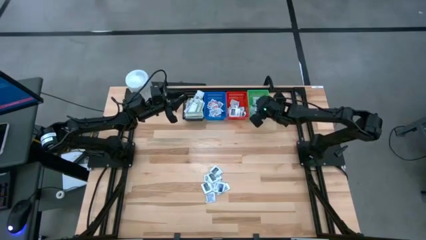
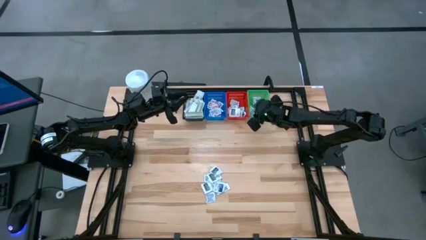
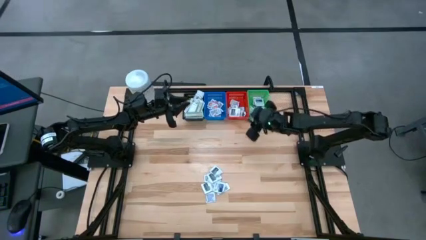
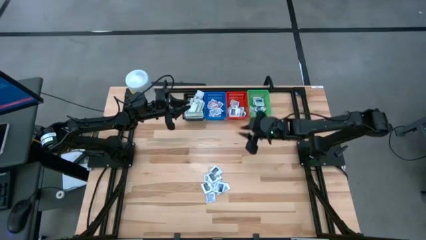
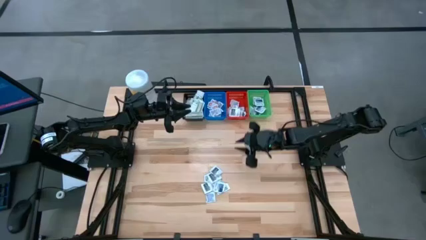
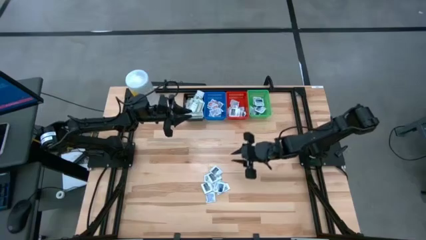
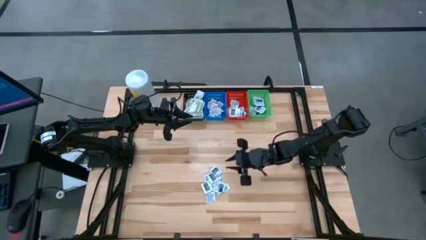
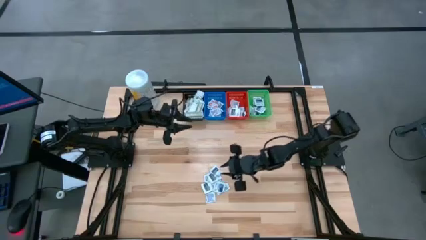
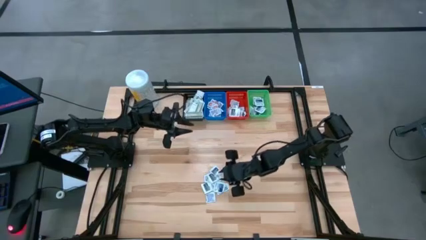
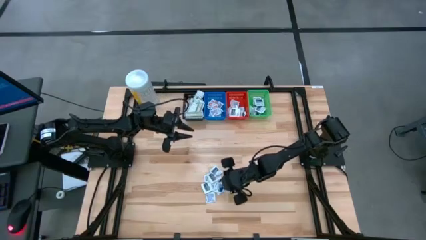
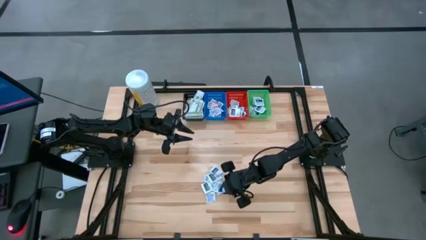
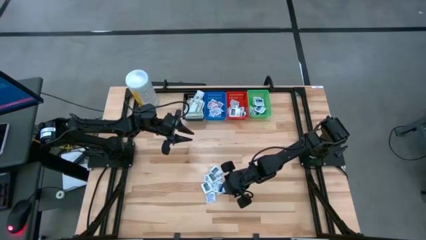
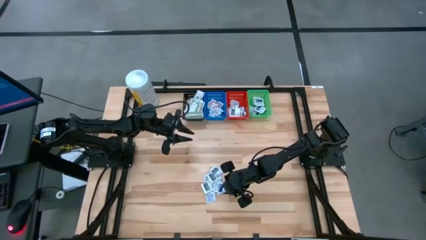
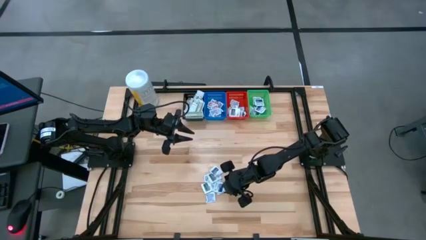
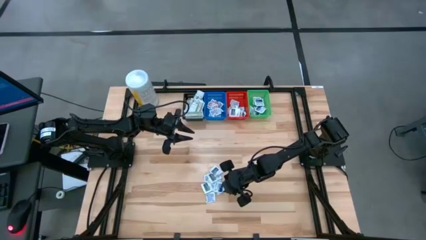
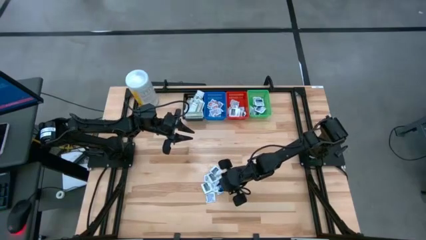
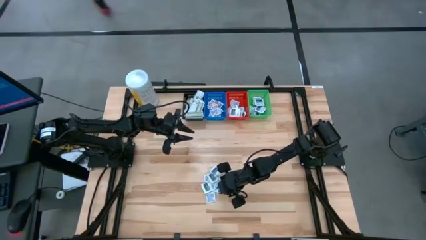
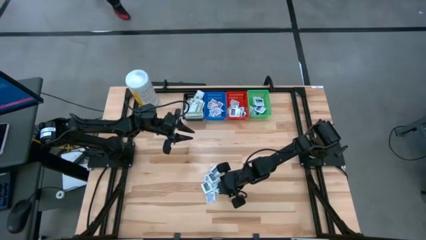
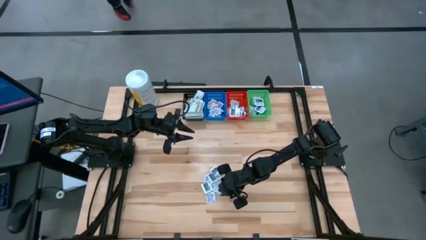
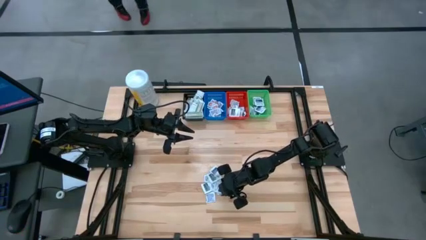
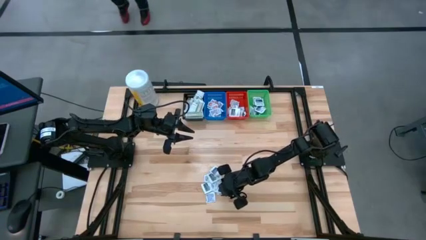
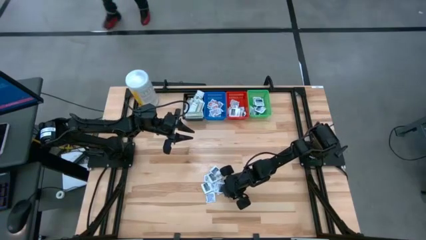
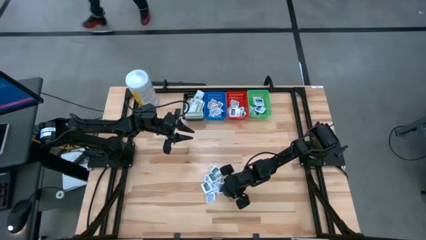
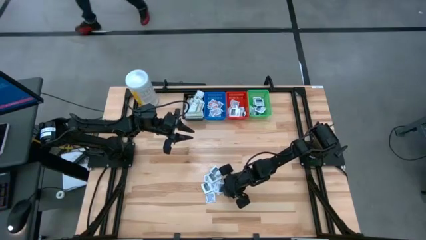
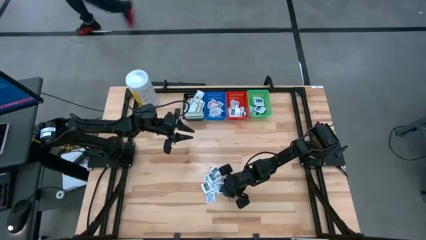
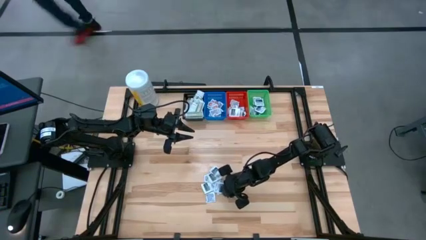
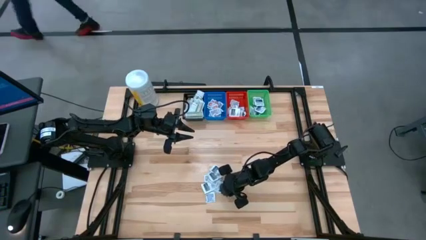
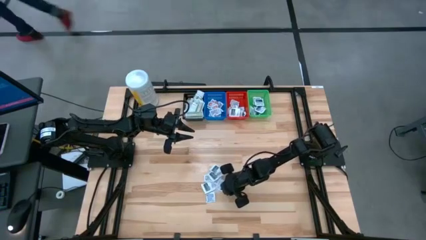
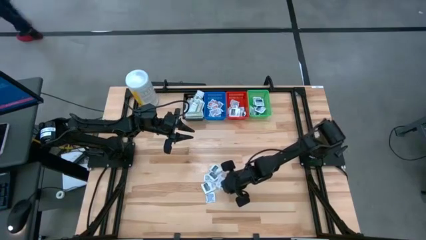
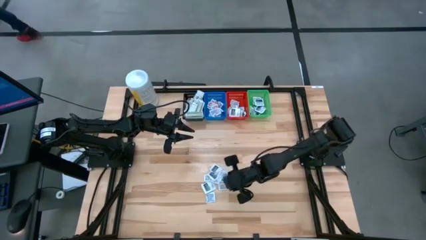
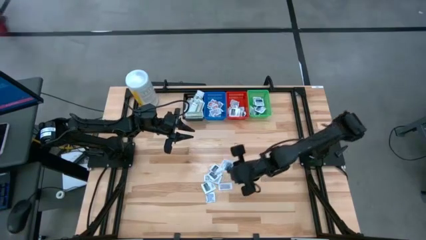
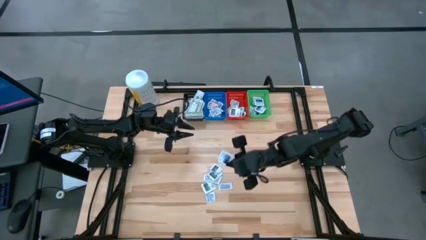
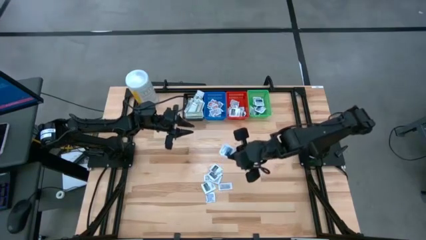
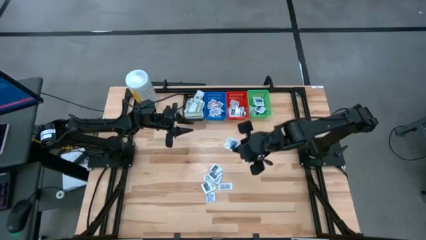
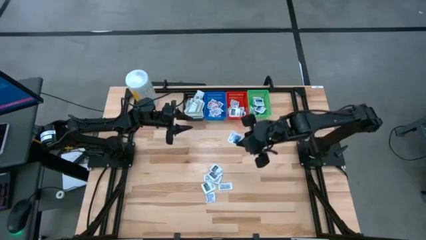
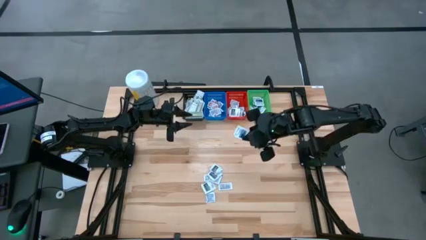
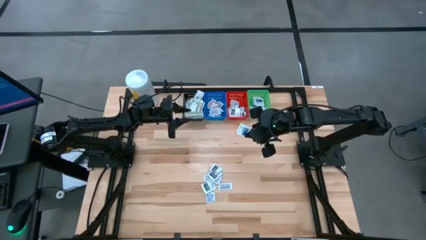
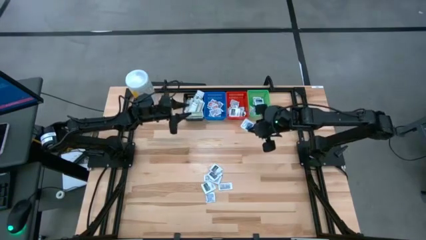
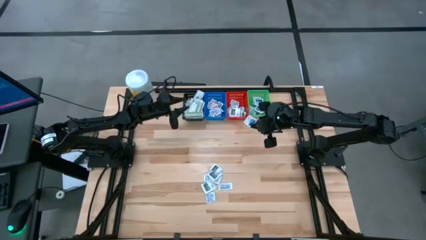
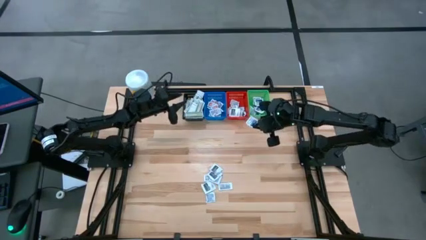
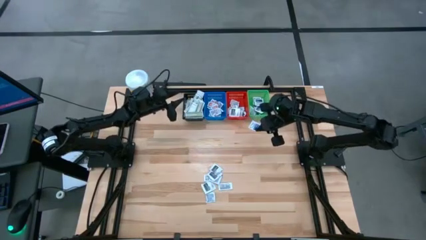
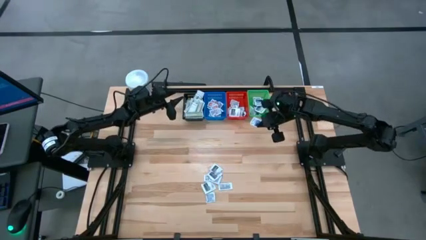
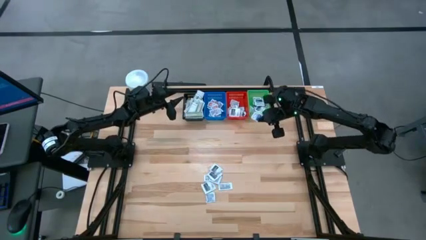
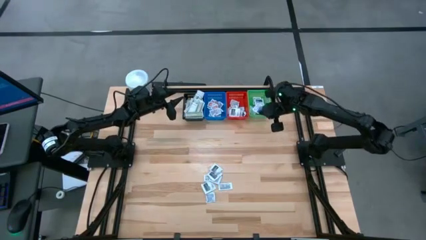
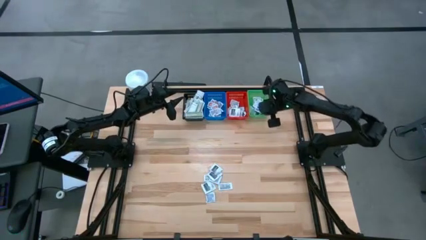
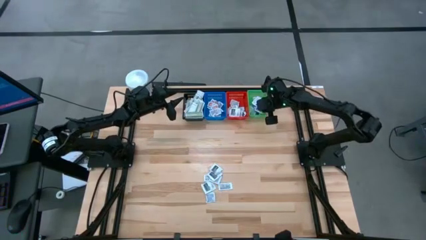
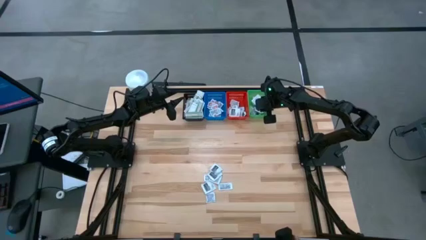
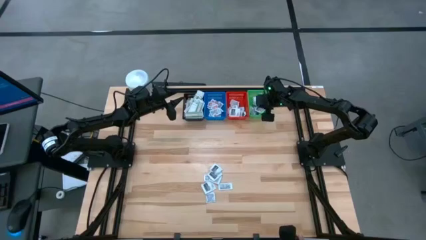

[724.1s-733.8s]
Task: Pick & Place First Aid Supplies
Put the blue alcohol pad in the green bin
